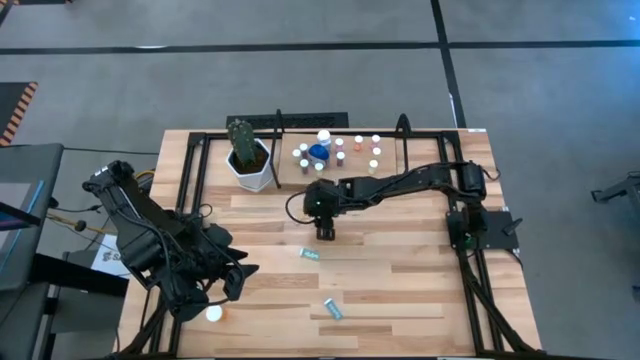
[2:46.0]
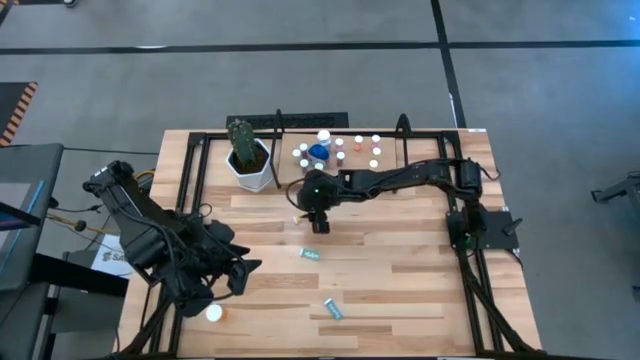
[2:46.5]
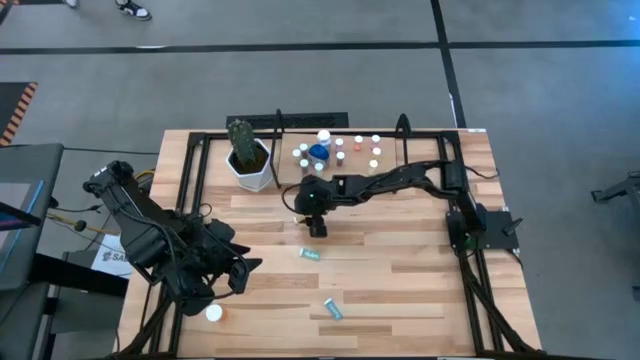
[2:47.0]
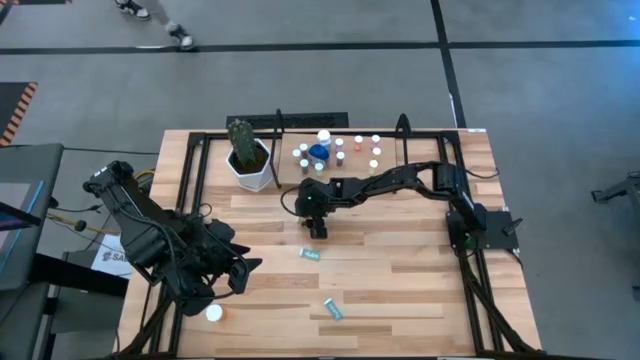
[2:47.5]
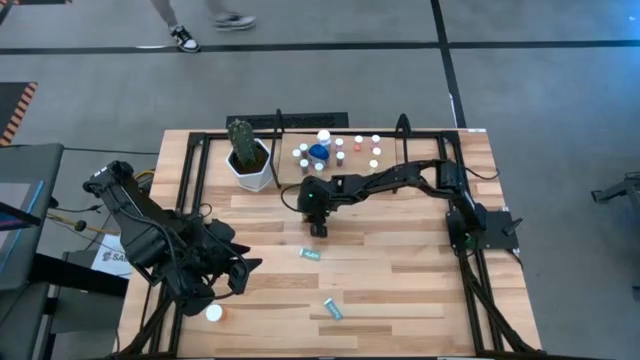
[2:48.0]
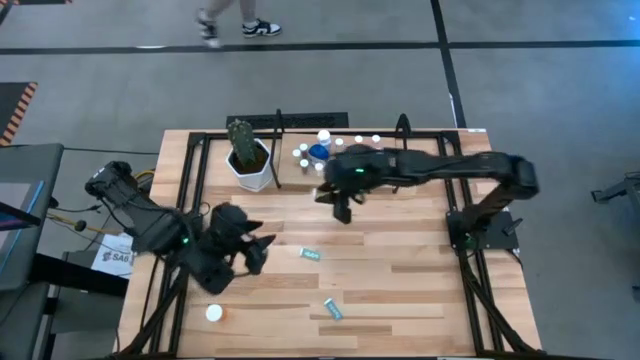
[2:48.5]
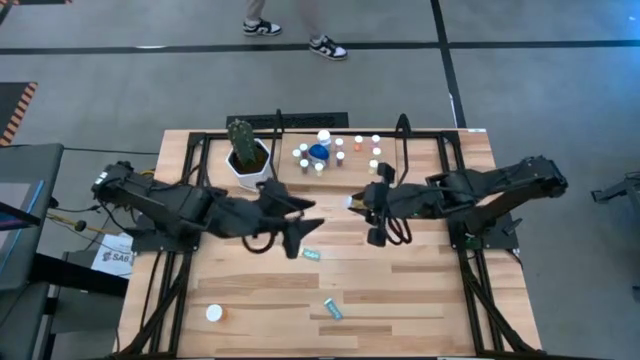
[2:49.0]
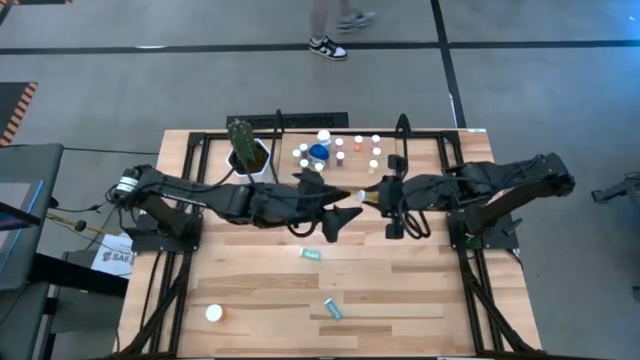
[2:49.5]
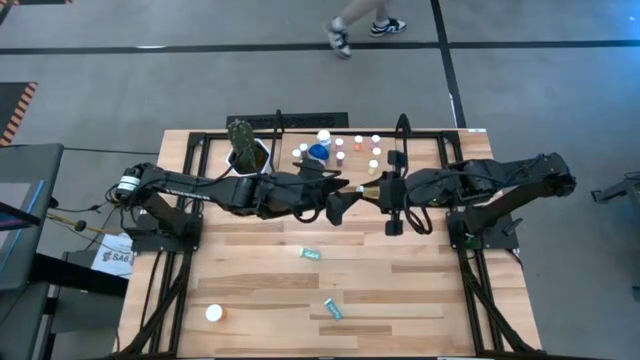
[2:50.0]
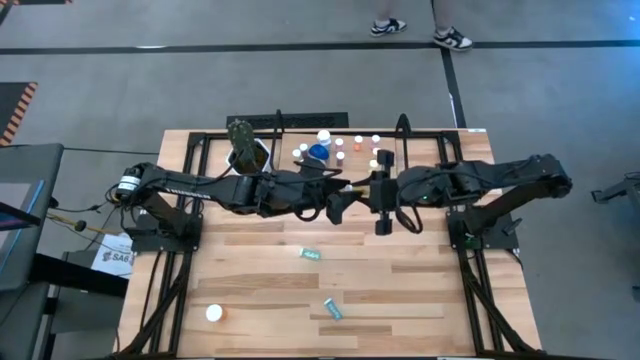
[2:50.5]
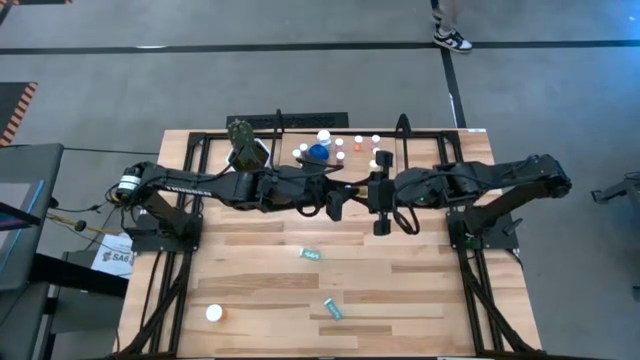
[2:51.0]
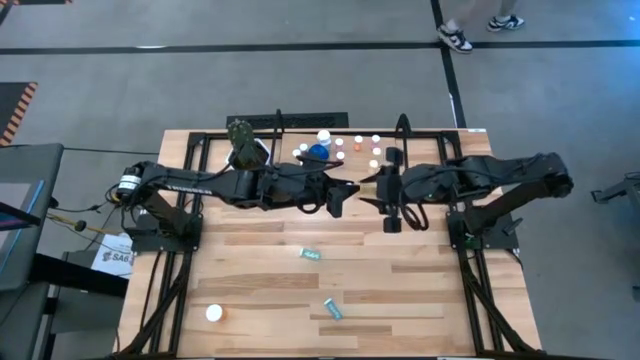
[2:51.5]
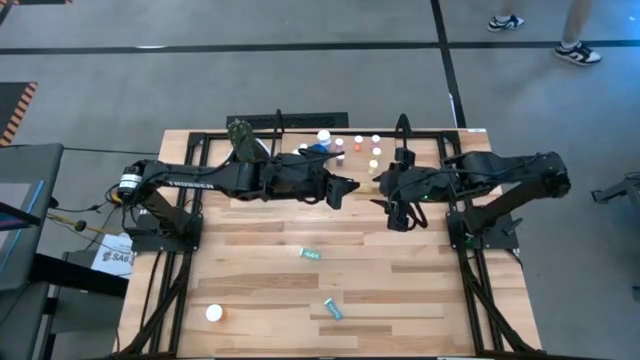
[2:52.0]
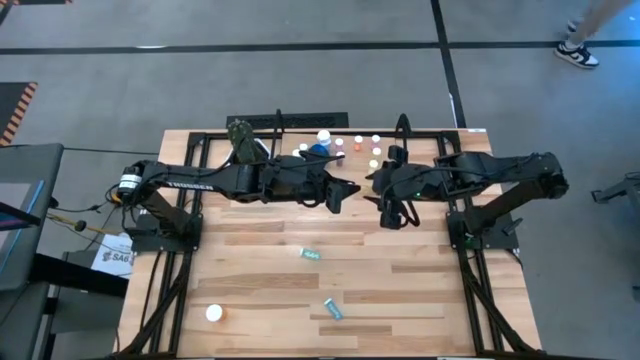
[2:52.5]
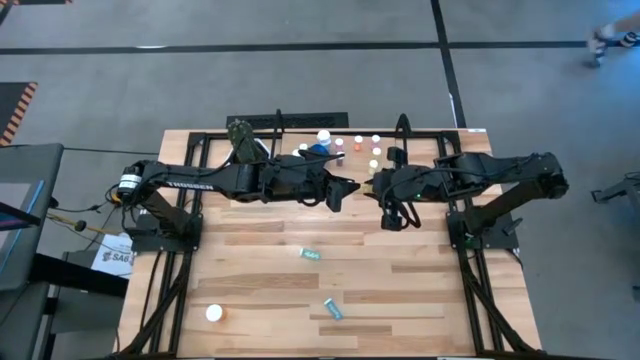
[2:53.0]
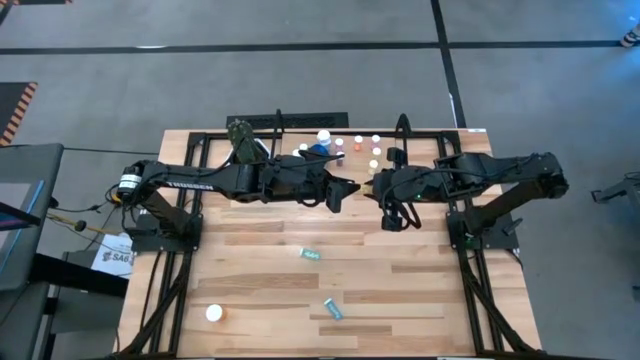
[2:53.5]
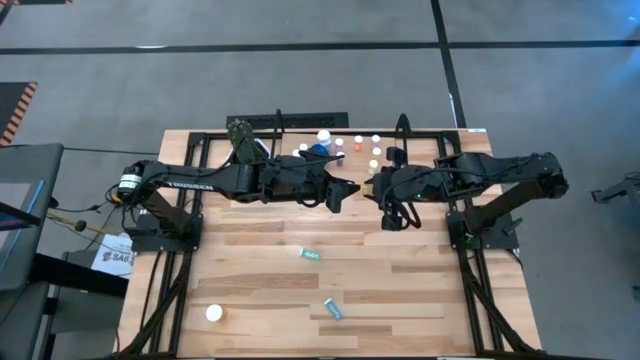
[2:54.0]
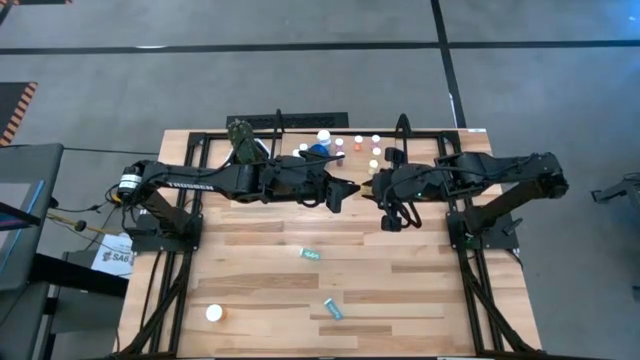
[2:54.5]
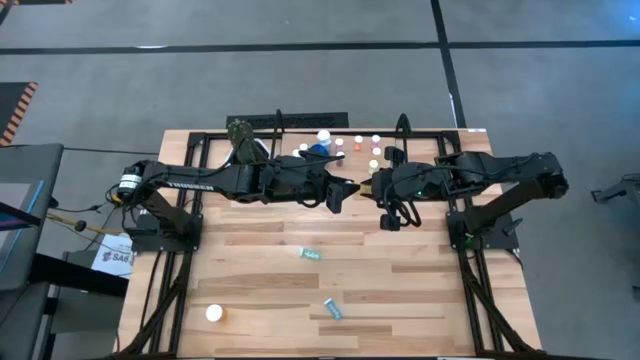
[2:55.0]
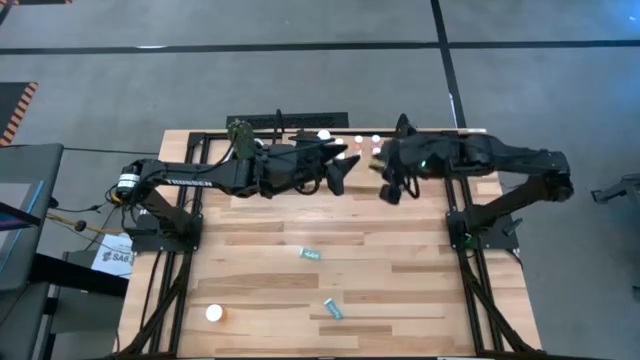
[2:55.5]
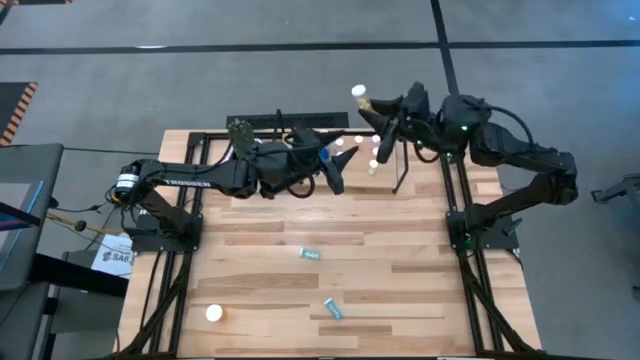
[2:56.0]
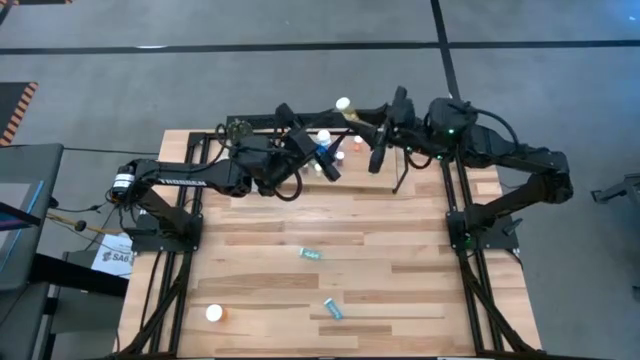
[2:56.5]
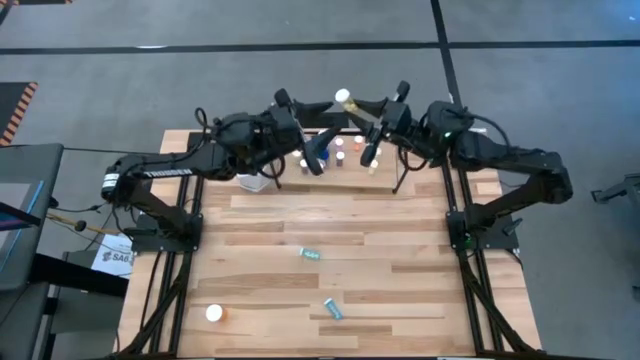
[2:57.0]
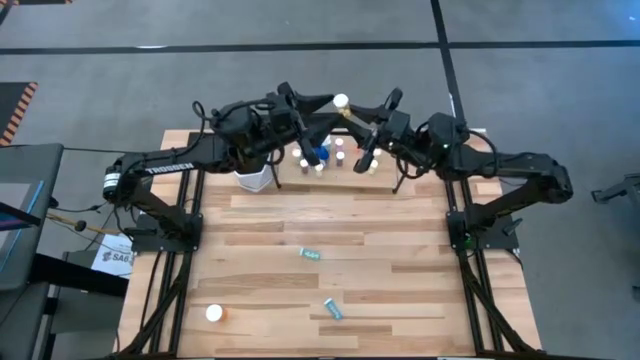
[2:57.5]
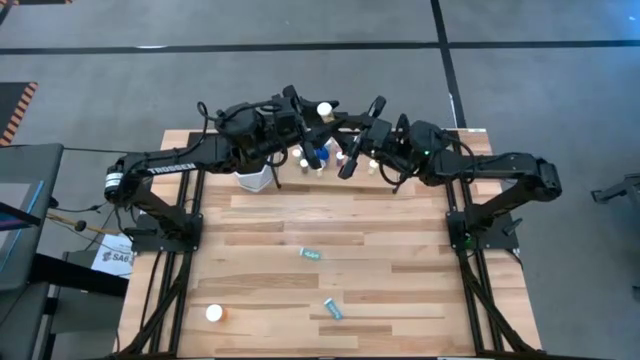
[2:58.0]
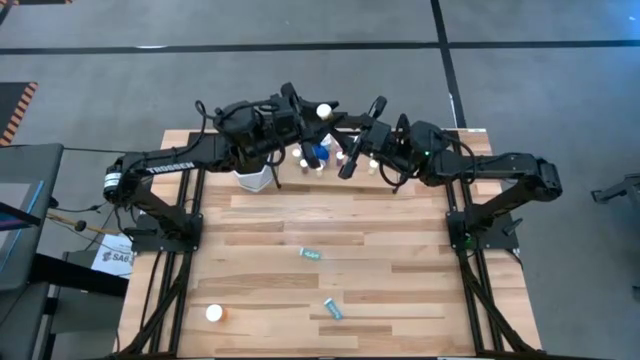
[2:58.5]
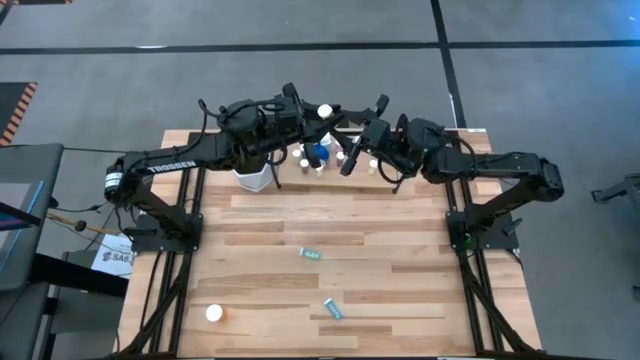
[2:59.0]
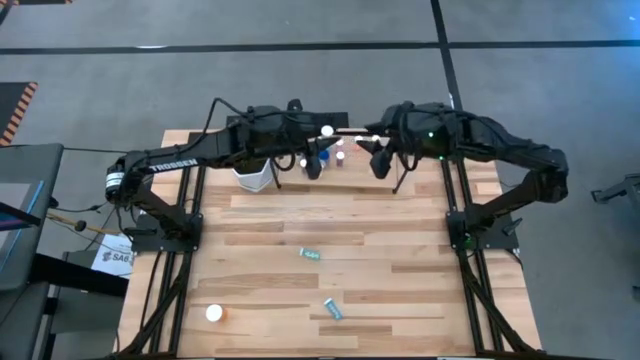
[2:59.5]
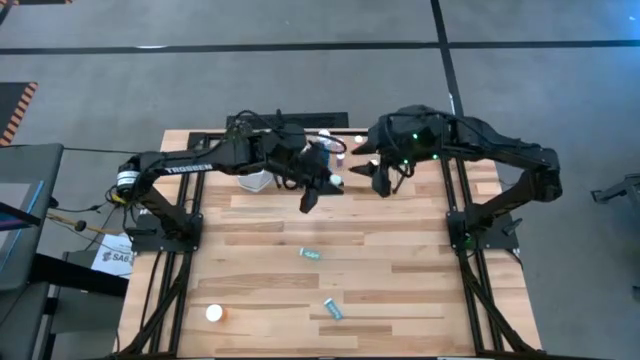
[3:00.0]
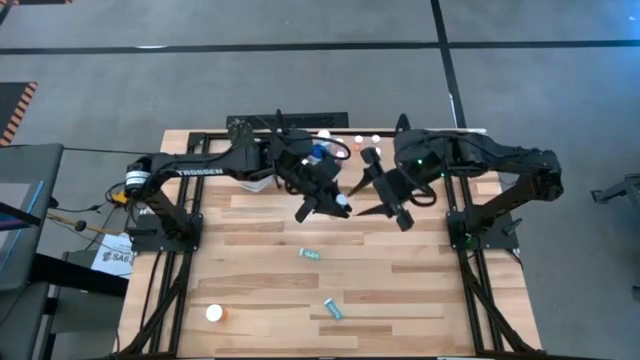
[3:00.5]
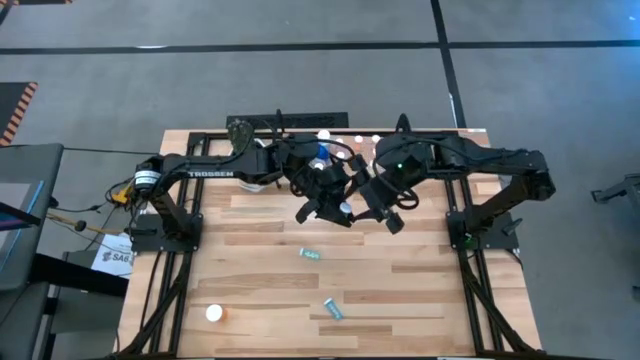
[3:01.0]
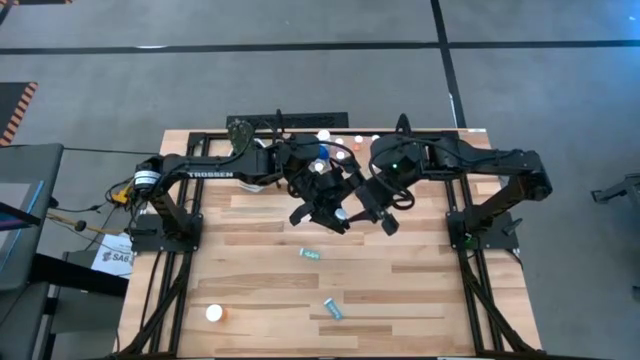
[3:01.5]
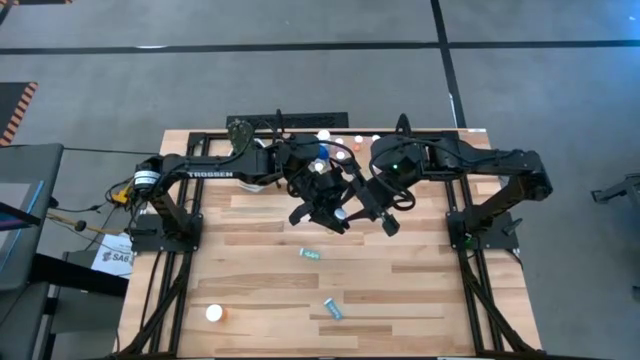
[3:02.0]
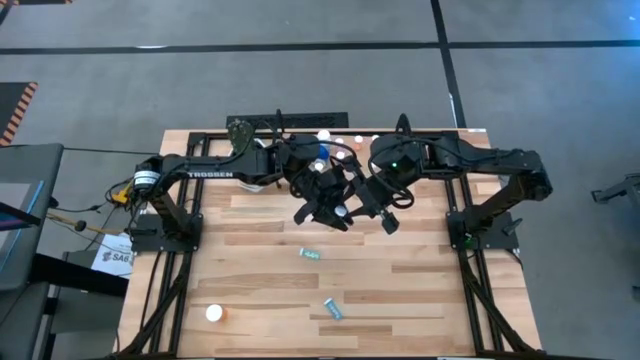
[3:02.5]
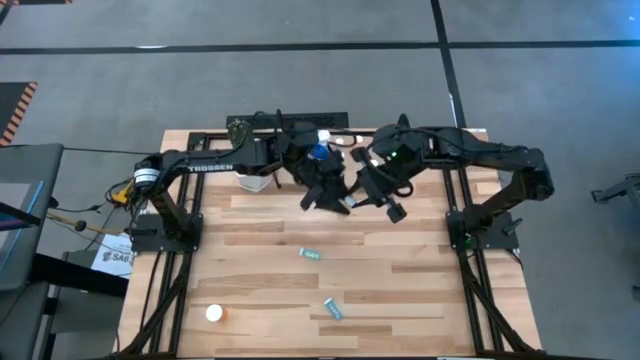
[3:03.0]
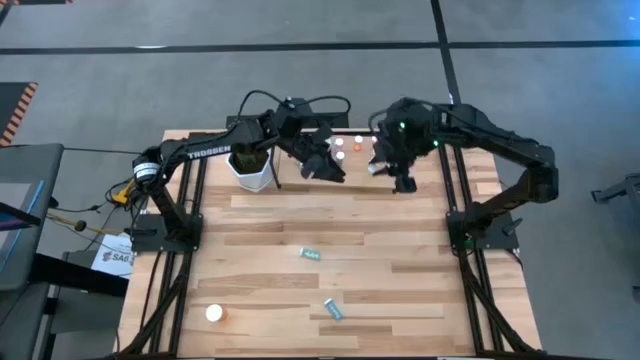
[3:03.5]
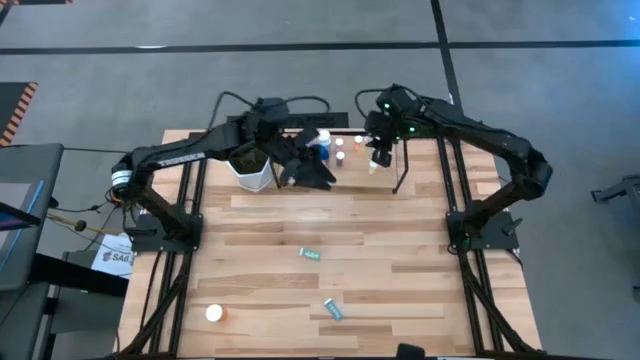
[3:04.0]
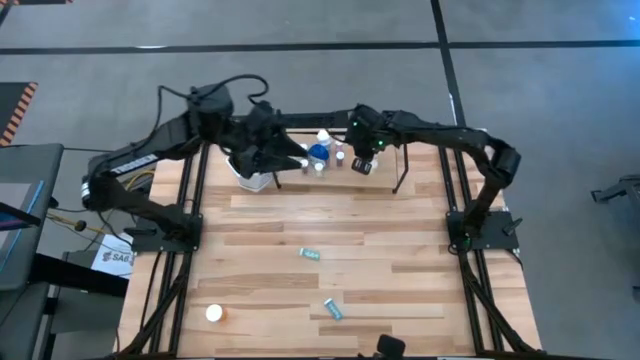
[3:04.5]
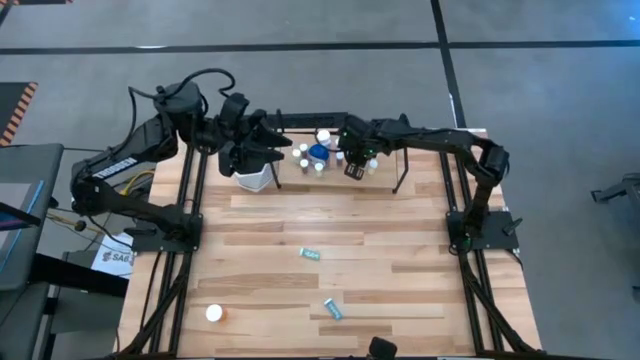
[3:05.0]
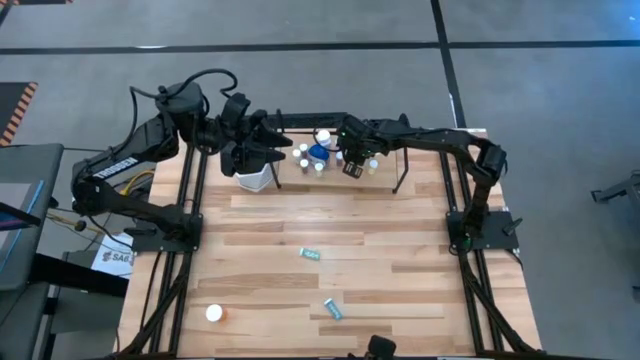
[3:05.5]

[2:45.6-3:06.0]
Task: Pick and place medicine bottles onto shelf by color
Put the yellow pill bottle on the shelf

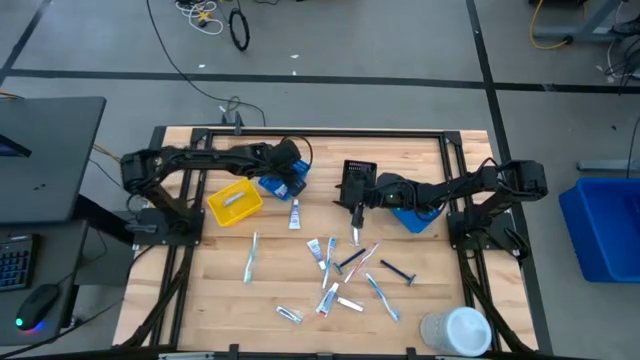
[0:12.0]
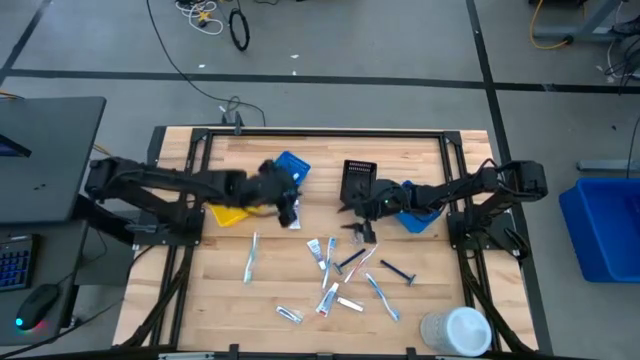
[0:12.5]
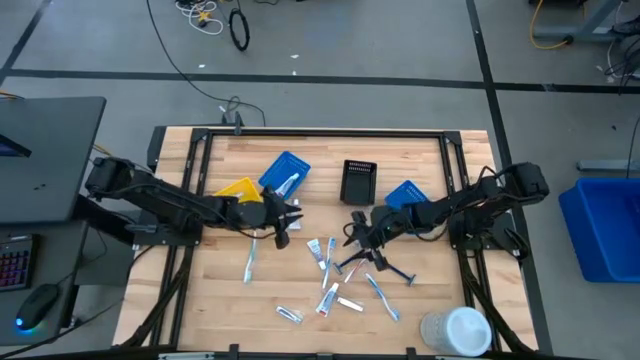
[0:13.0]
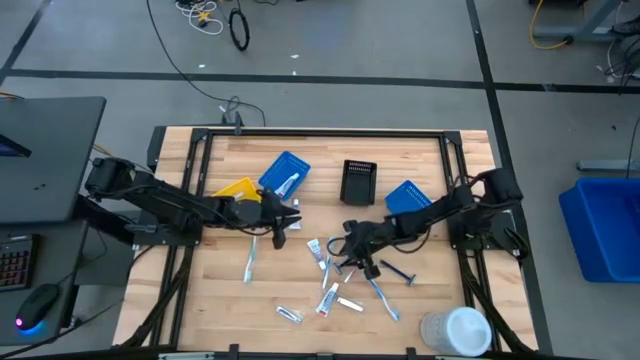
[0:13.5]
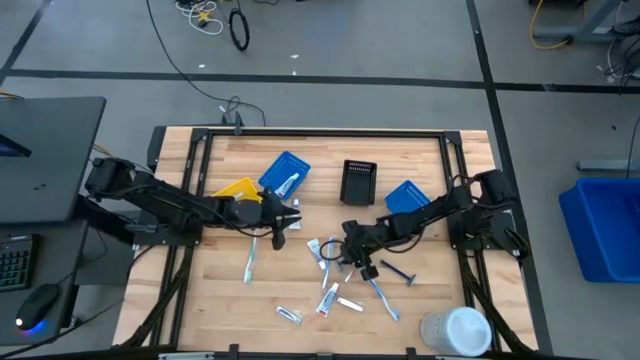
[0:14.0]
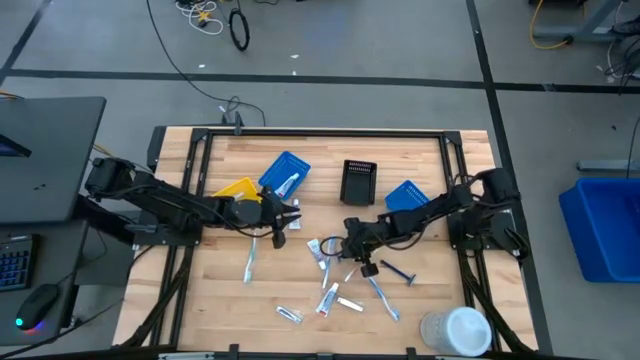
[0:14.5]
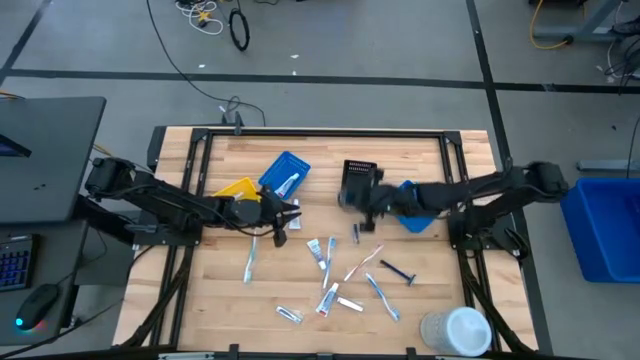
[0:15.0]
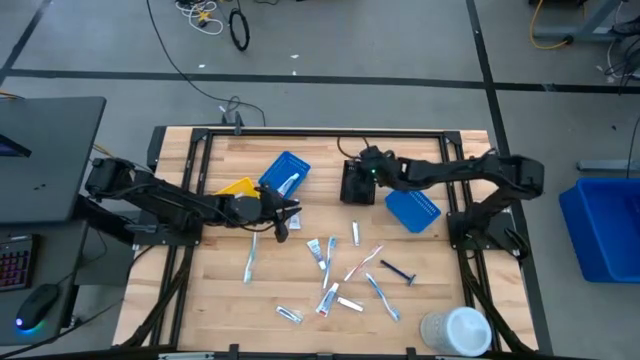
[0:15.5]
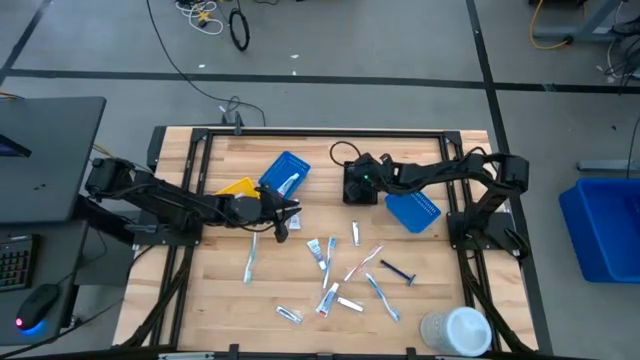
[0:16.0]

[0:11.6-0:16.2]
Task: Pick & Place Travel size toiletries
Put the blue razor into the black bin
